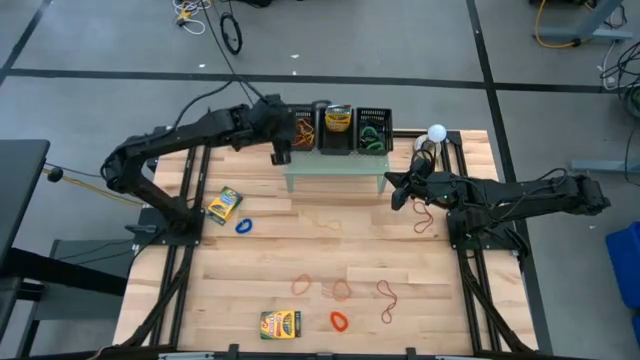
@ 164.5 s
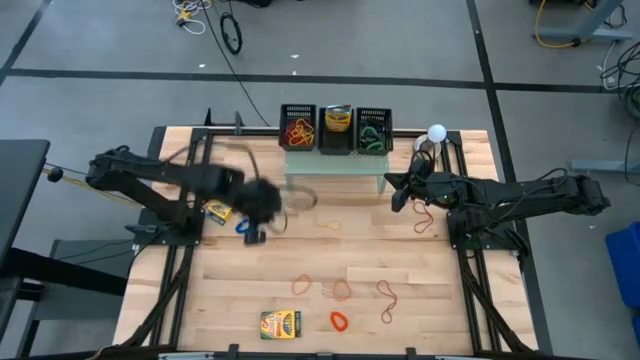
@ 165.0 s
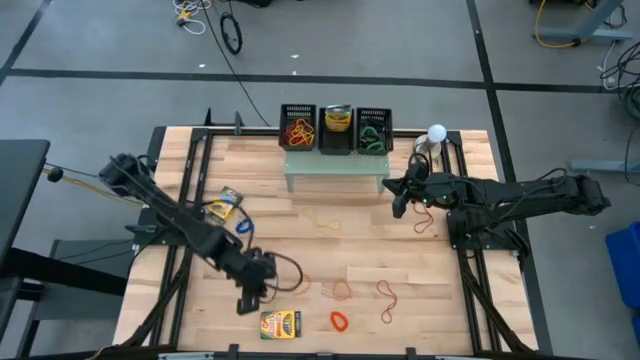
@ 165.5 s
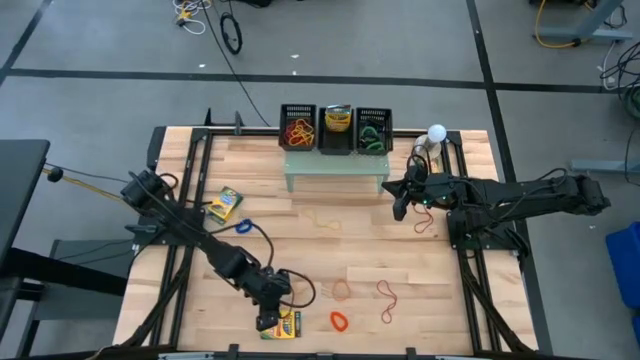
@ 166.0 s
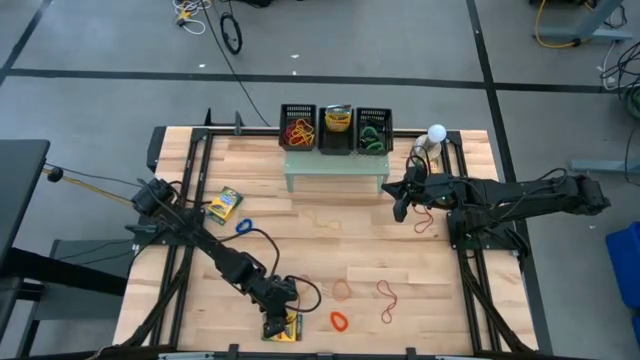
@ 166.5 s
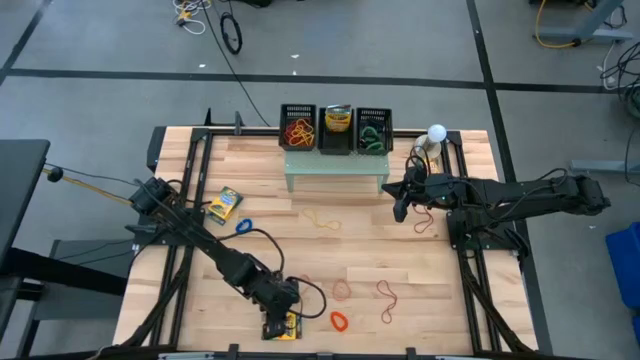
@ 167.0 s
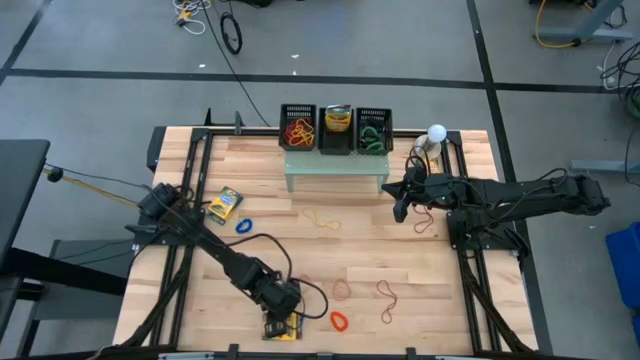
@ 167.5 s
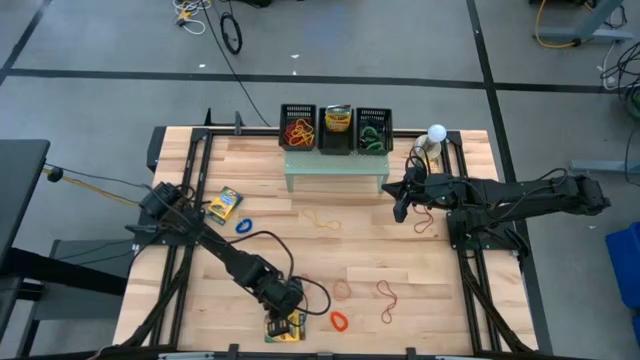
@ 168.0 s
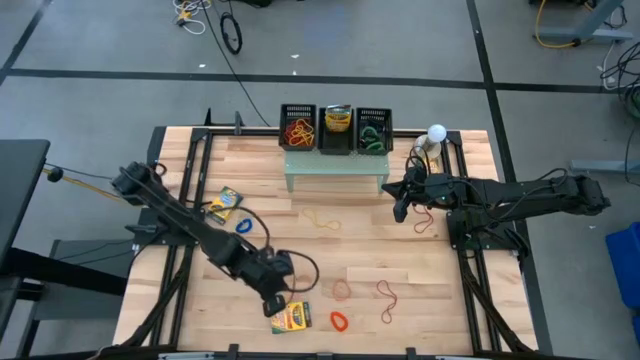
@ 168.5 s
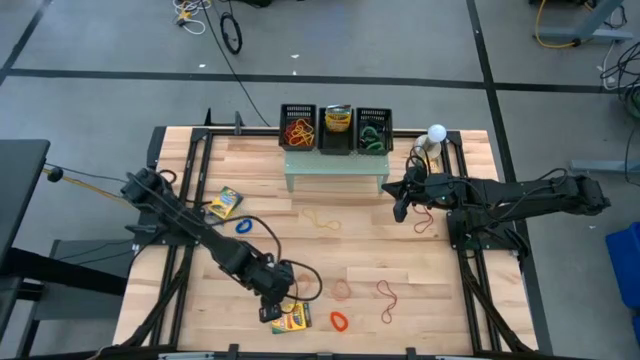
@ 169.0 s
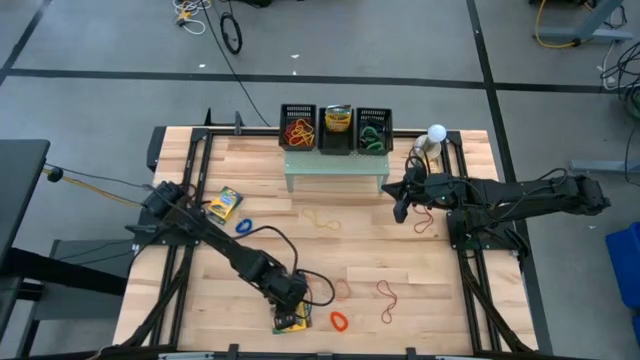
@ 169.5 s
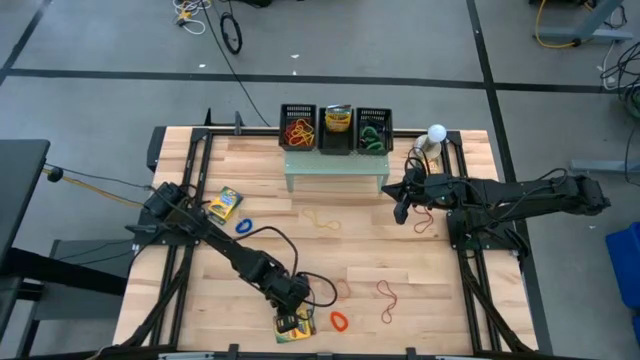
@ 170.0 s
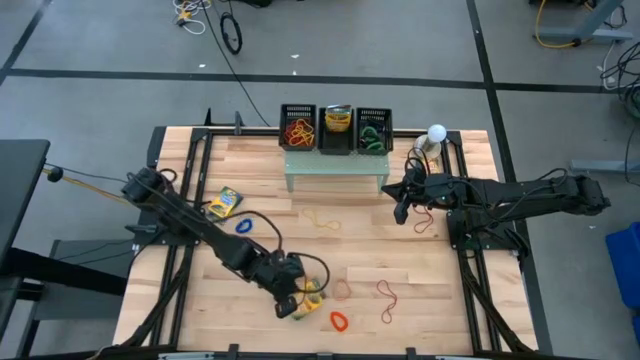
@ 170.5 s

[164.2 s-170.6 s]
Task: Pick & Place Office Desk Supplies
Put the crayon box on the middle black bin on the shelf

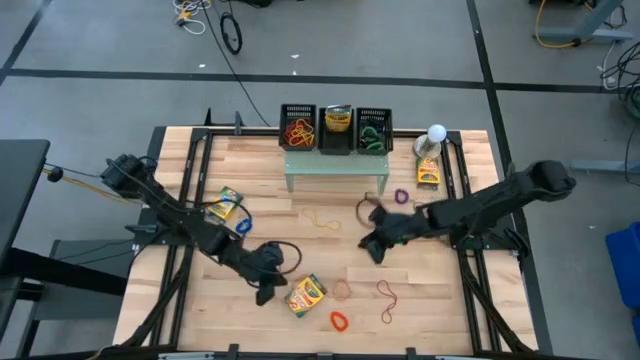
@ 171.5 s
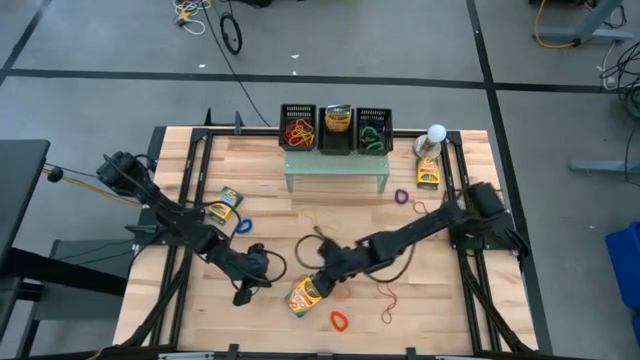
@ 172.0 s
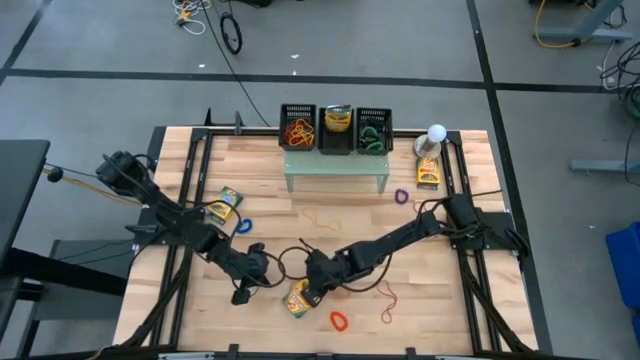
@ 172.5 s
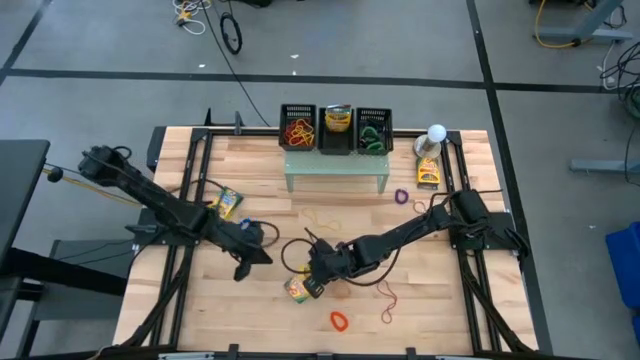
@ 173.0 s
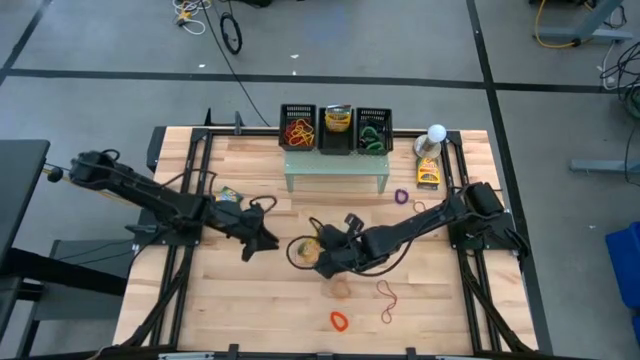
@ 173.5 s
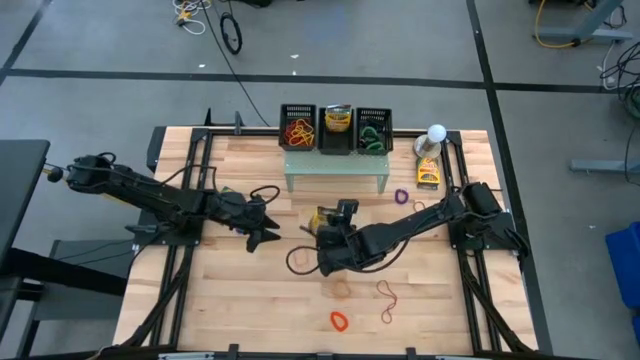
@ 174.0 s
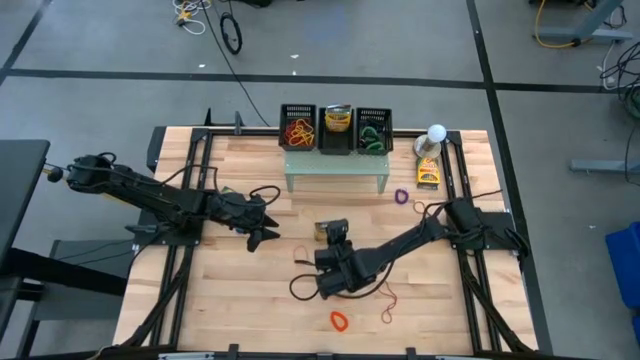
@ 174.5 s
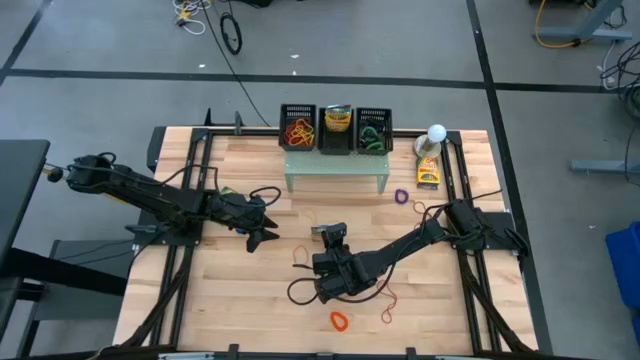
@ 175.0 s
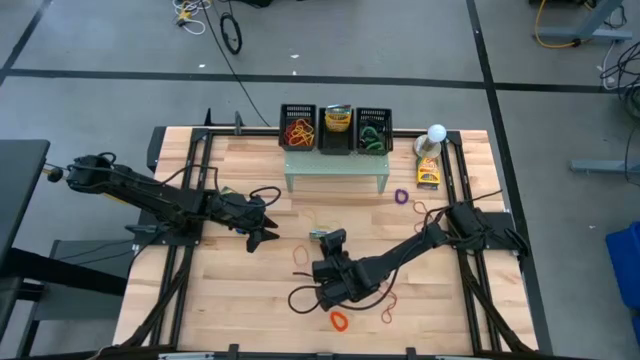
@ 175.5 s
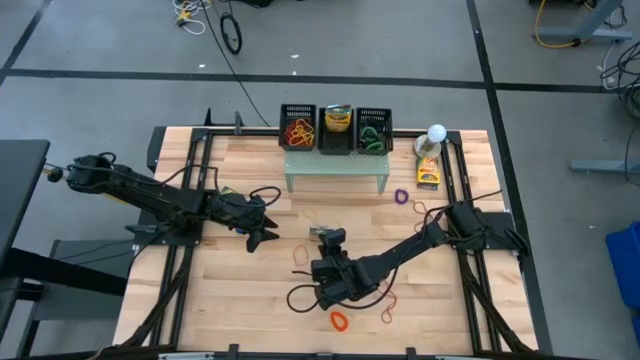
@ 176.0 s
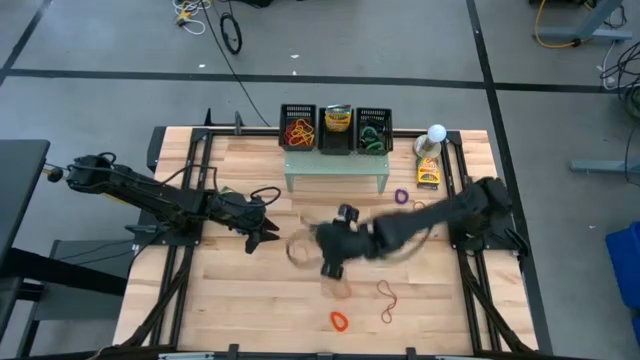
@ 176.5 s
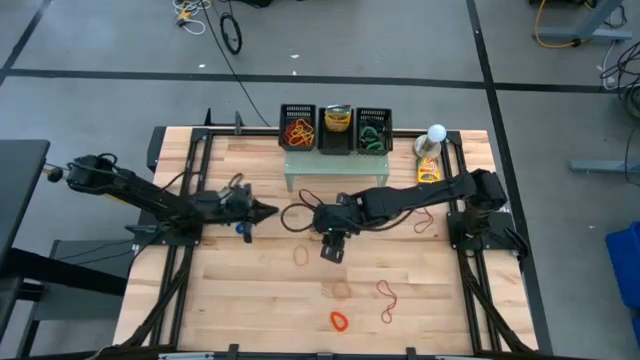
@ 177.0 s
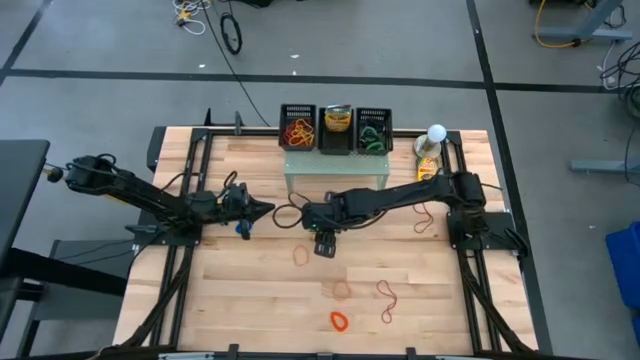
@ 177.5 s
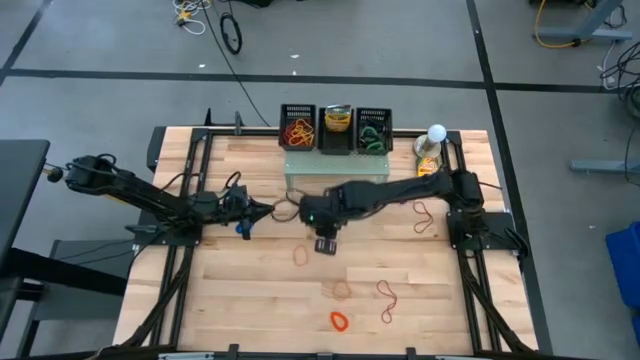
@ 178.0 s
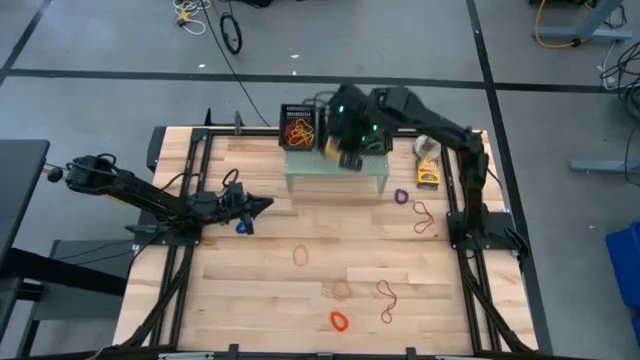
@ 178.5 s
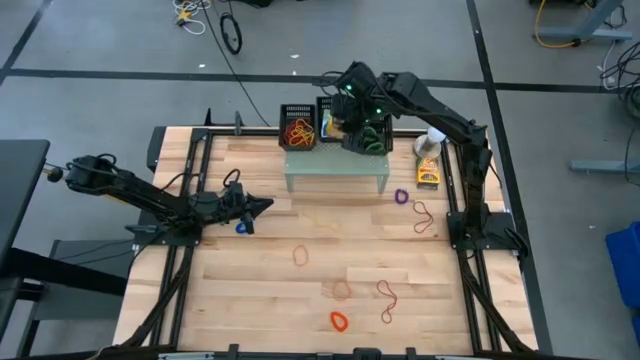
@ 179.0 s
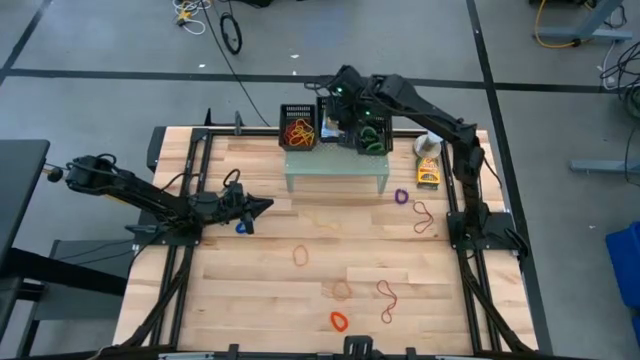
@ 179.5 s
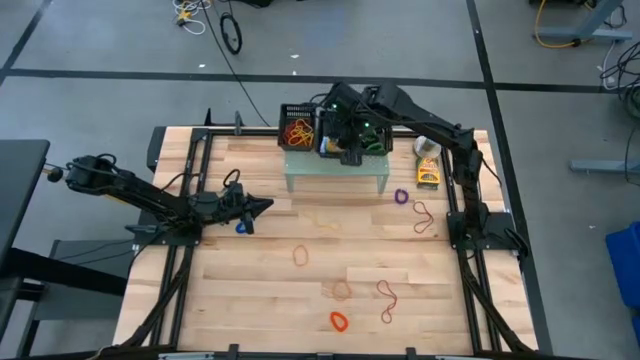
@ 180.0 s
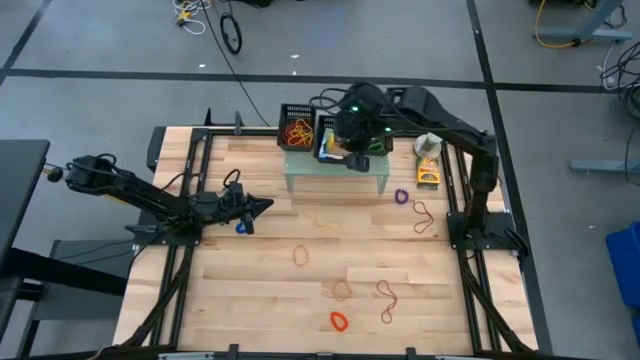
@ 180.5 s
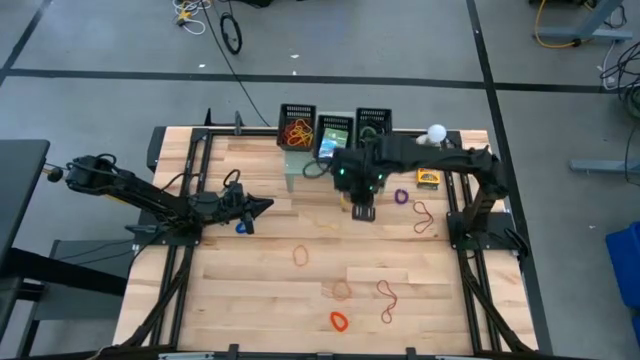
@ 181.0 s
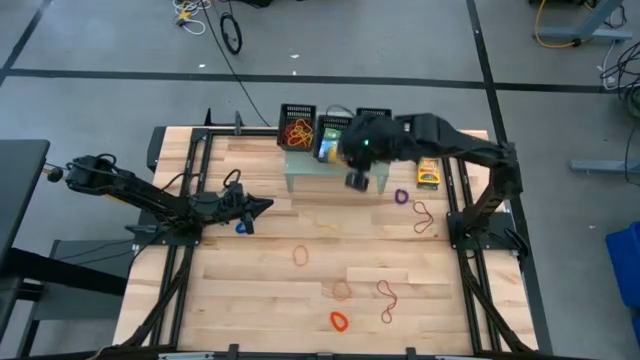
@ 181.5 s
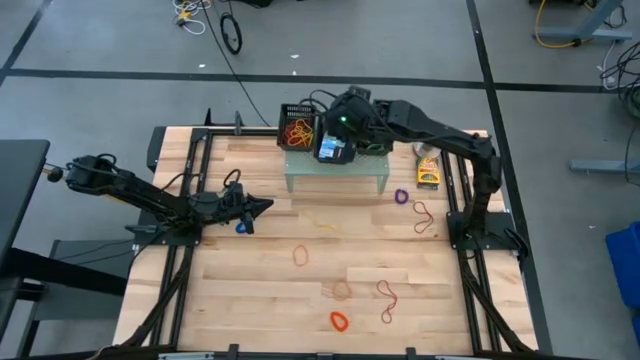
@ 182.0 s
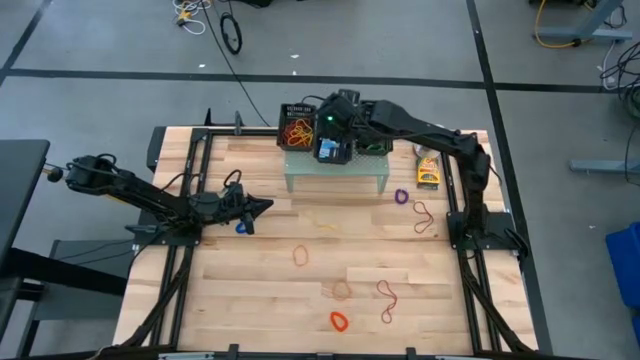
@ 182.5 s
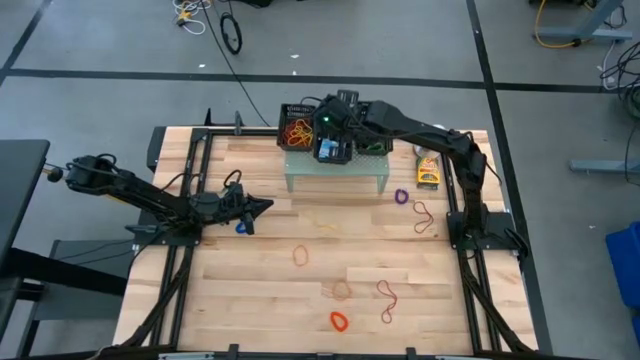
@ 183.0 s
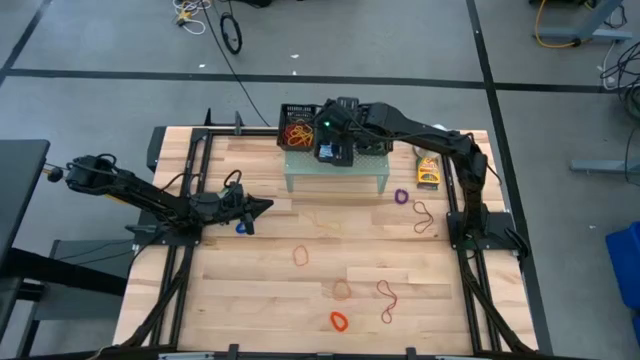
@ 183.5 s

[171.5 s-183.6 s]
Put the crayon box on the middle black bin on the shelf

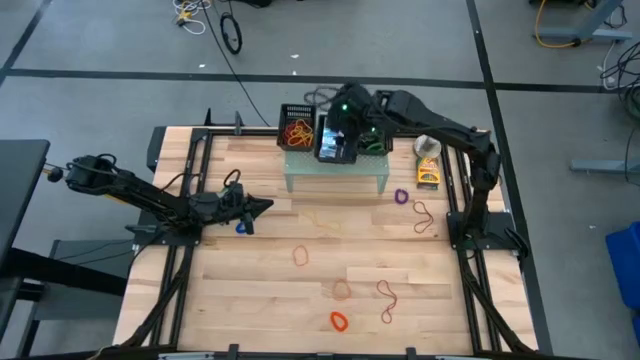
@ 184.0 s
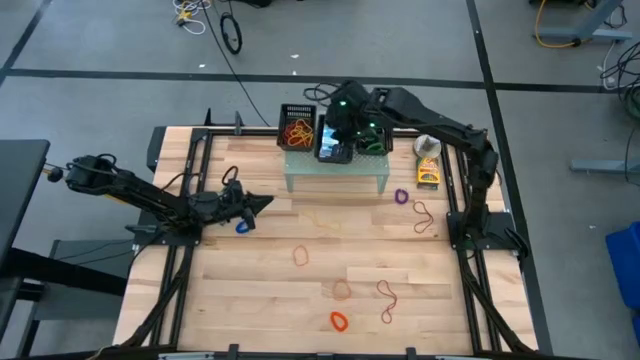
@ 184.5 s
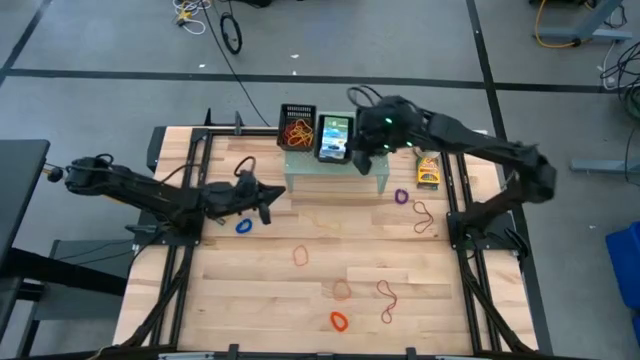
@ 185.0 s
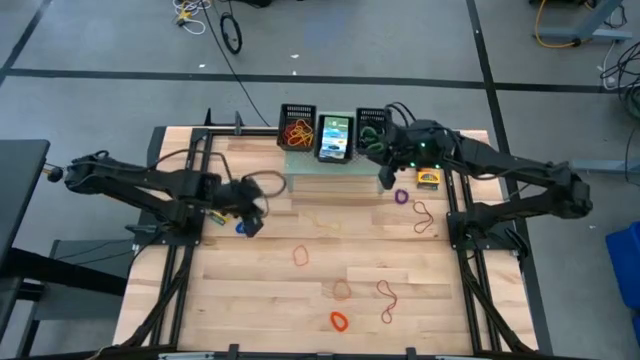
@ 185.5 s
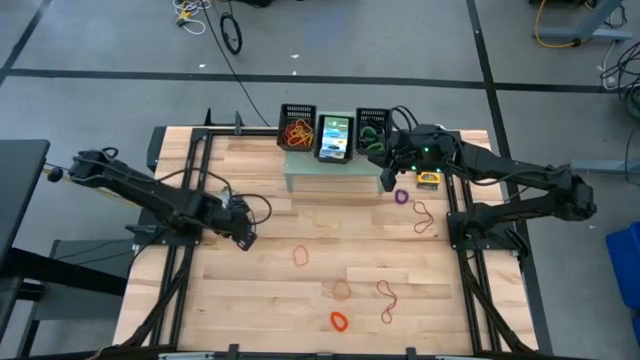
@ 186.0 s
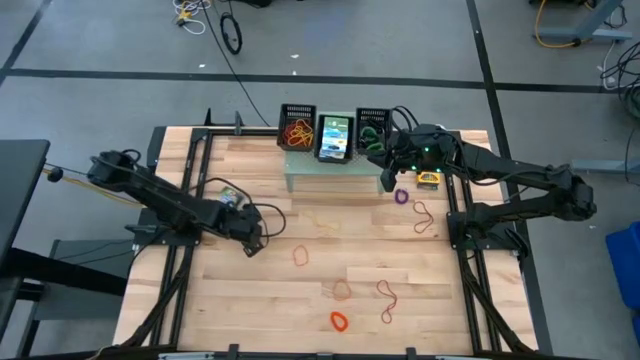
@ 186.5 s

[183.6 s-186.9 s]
Put the blue spring bracelet into the right black bin on the shelf
